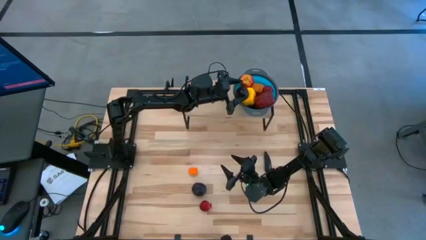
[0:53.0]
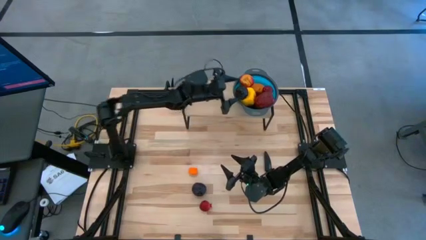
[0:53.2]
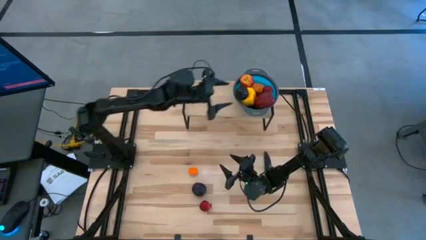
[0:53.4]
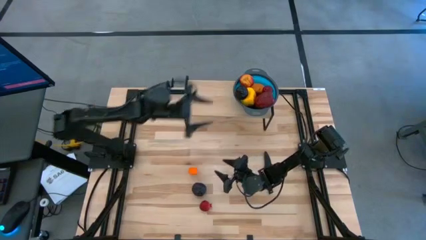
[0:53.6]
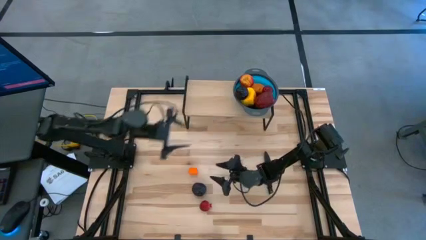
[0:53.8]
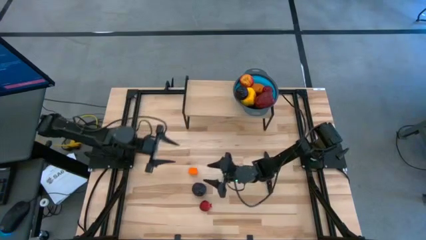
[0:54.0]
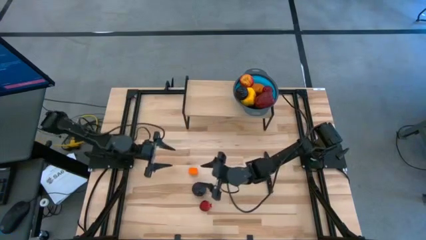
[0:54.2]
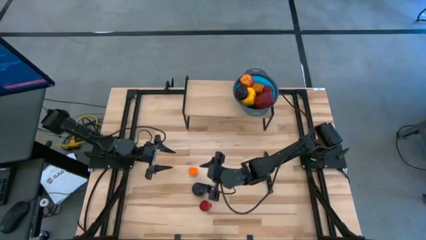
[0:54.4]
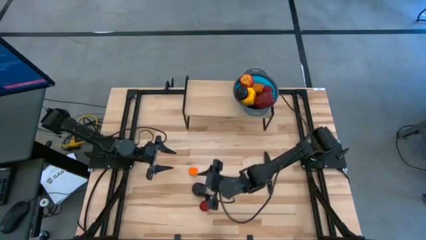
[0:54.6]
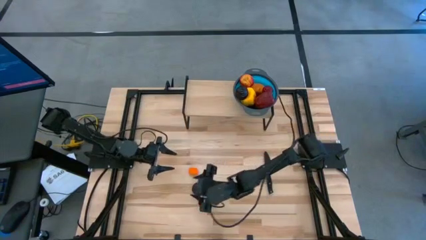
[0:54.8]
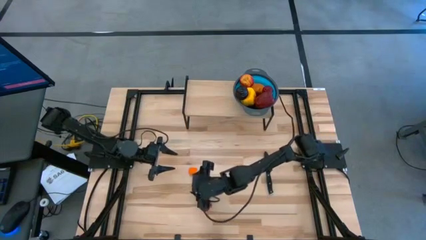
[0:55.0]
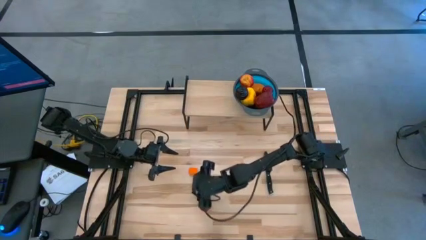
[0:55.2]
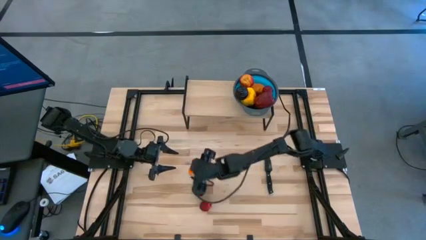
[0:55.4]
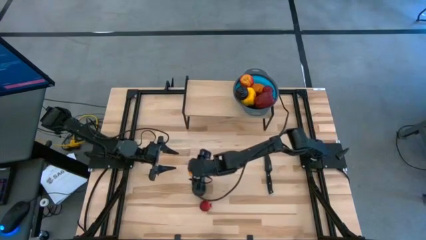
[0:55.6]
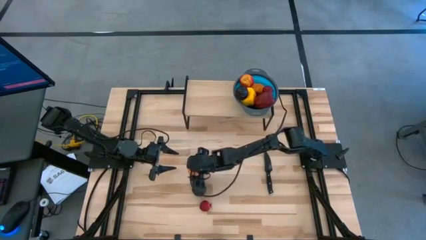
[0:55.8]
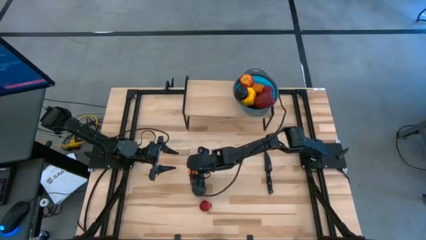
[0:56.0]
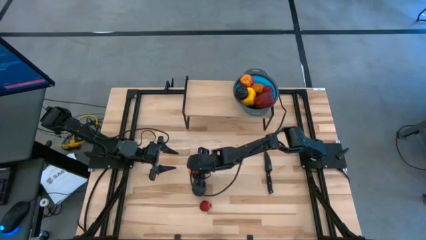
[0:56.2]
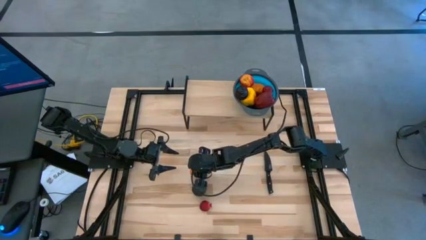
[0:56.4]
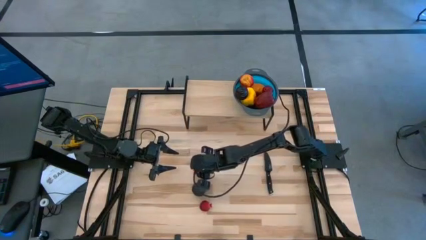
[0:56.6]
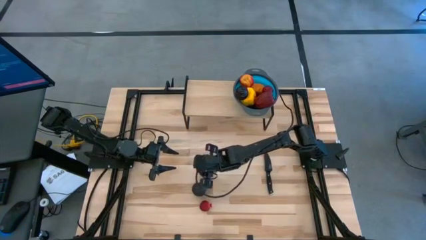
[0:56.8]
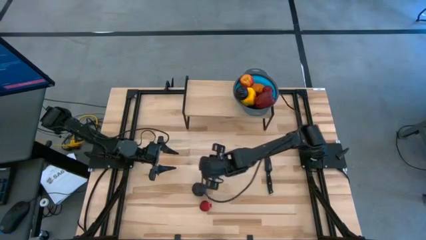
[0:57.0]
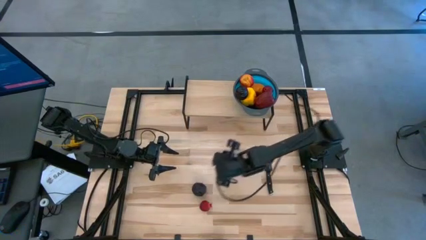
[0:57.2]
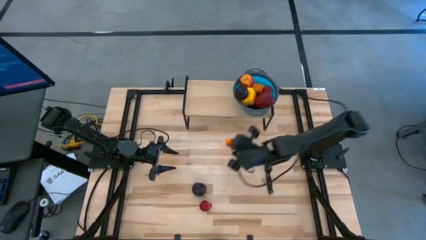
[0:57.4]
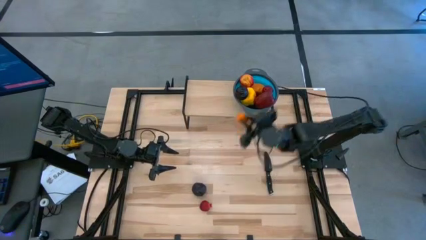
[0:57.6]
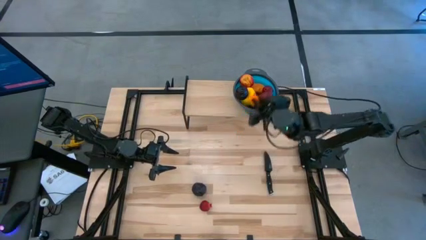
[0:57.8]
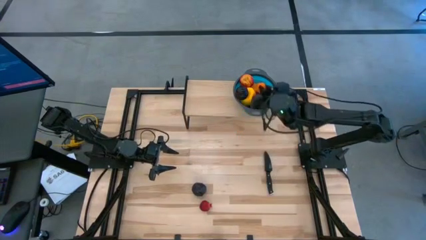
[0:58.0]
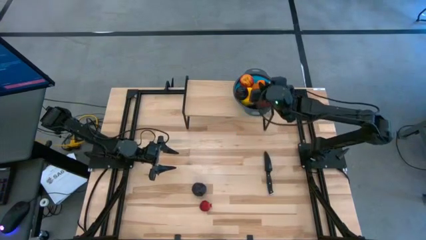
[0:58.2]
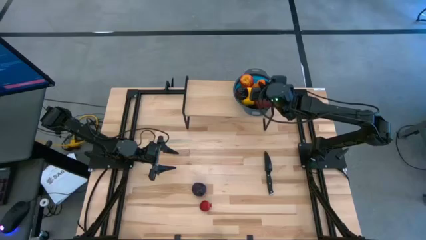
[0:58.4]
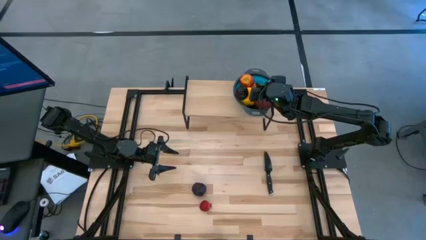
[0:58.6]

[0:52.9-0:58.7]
Task: Pick & Place Fruit
Put the orange into the strainer bowl

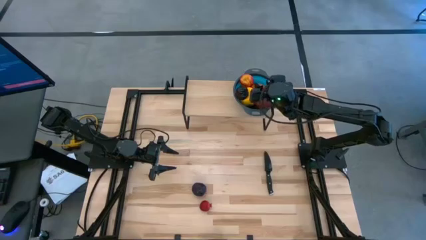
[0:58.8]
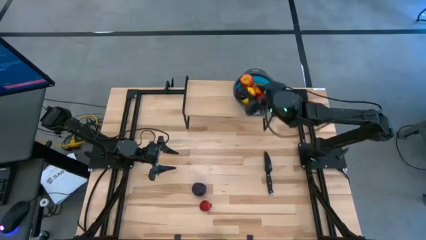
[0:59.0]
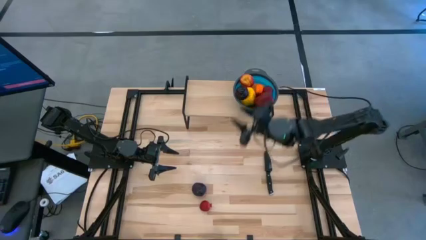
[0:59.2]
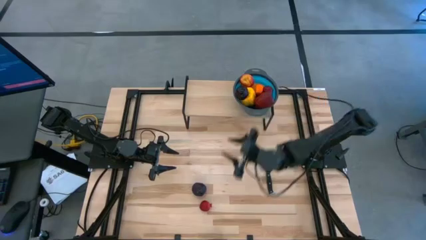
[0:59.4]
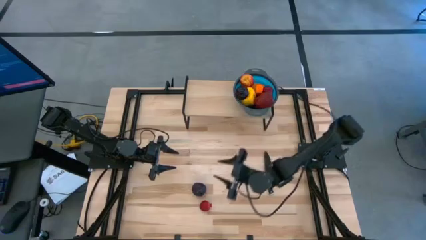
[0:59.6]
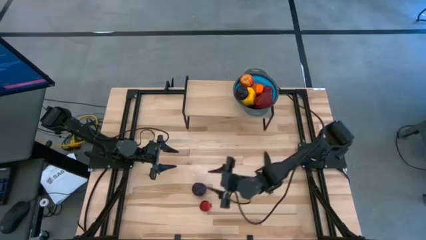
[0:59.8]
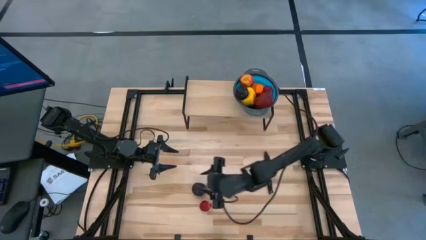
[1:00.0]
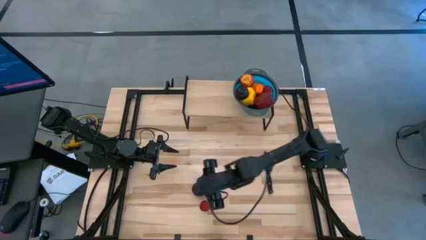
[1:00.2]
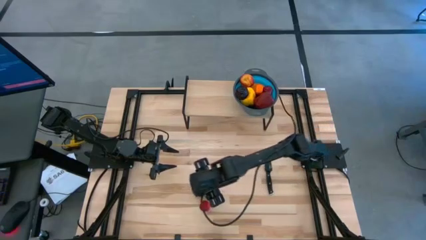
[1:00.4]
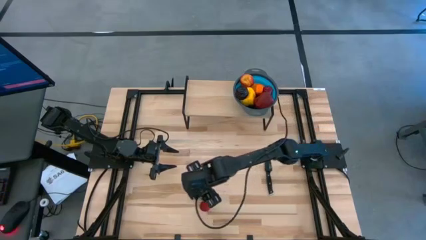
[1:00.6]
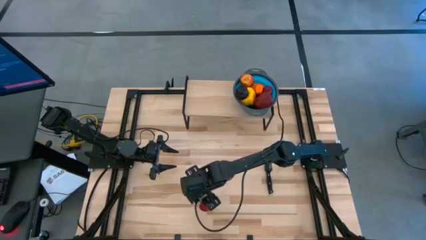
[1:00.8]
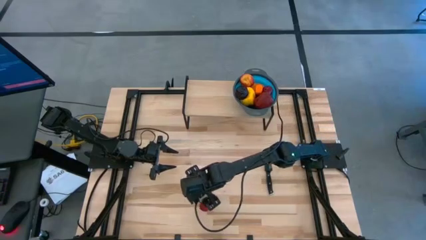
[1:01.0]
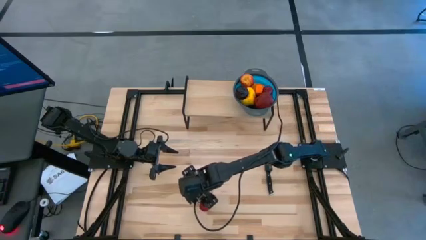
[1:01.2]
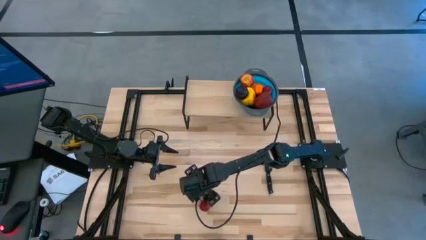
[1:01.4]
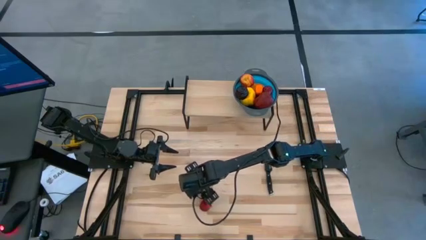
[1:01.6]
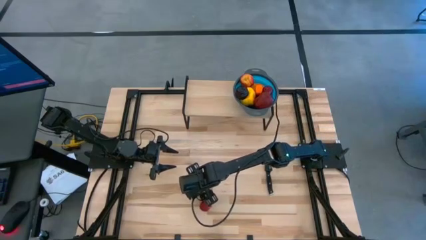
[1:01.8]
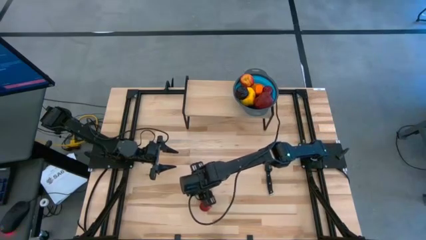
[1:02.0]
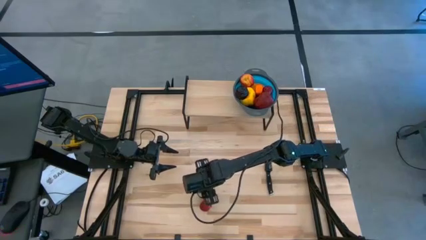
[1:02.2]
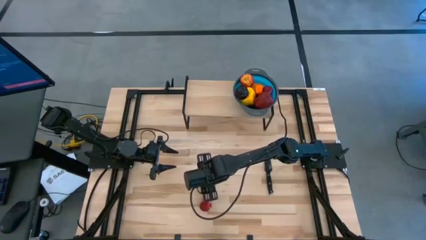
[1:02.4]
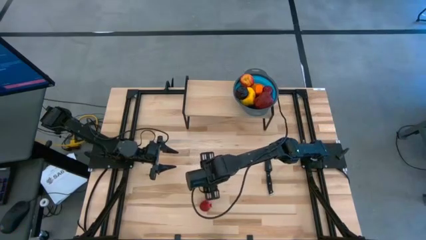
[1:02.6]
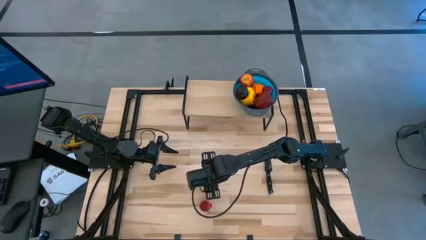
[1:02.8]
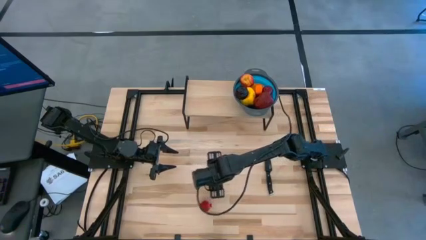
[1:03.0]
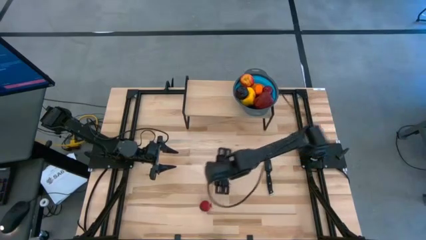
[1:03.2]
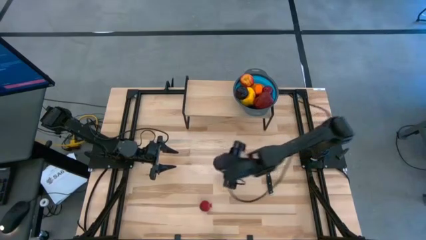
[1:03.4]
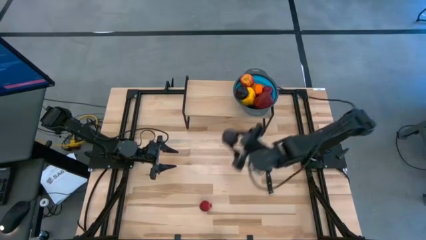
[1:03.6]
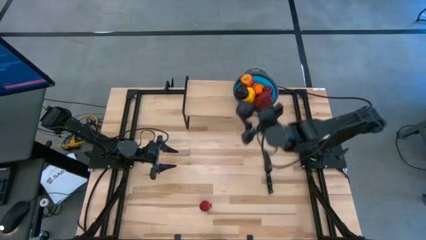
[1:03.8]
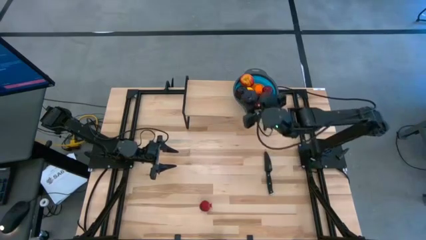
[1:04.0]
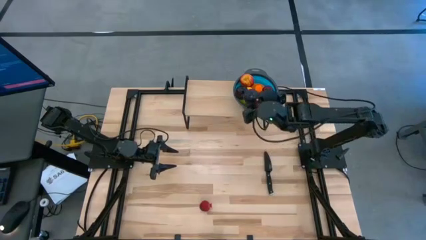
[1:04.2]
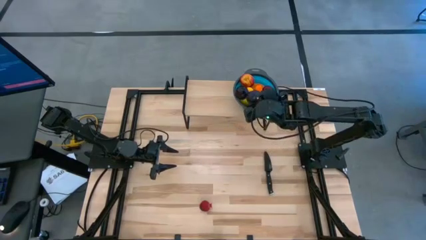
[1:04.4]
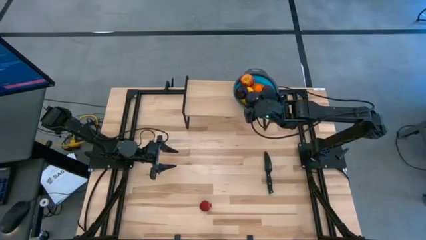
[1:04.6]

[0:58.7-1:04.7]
Put the plum into the strainer bowl

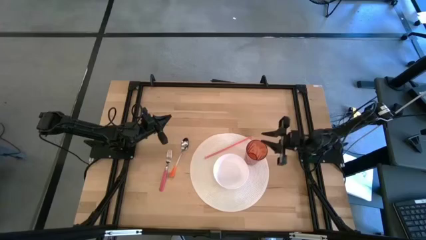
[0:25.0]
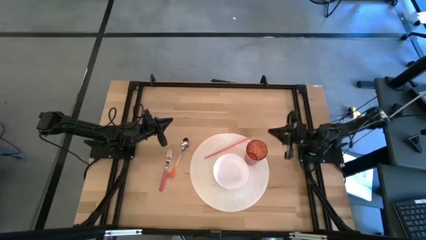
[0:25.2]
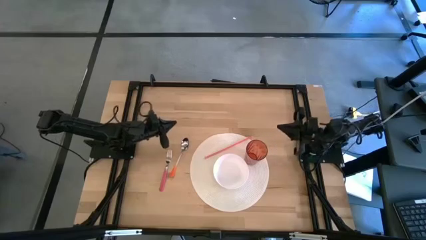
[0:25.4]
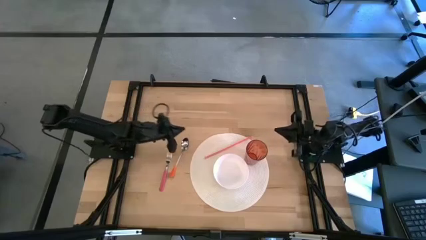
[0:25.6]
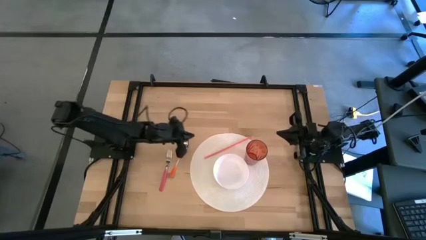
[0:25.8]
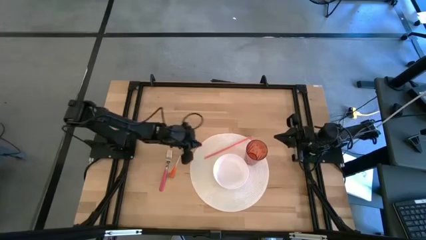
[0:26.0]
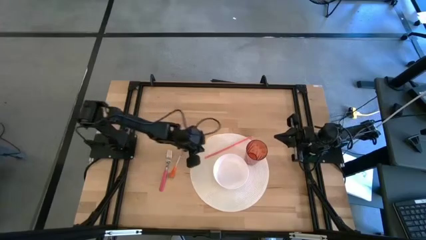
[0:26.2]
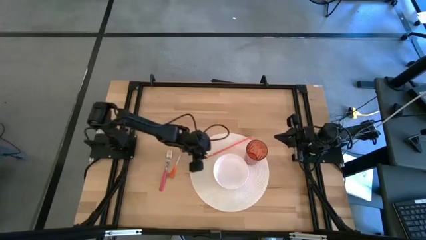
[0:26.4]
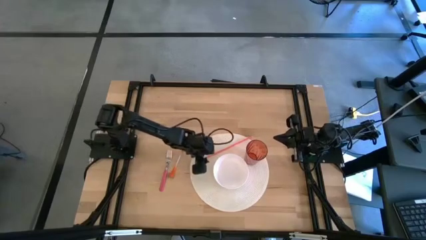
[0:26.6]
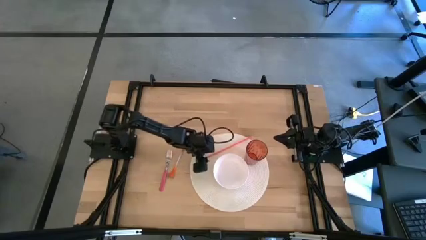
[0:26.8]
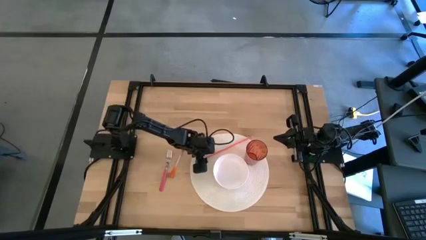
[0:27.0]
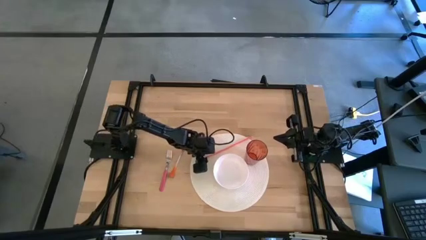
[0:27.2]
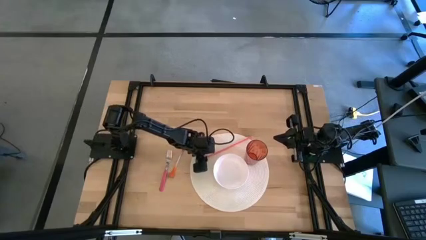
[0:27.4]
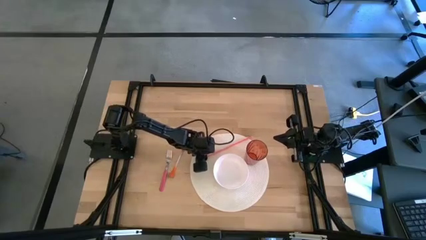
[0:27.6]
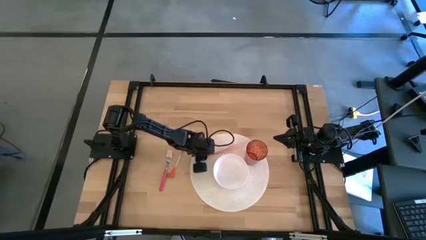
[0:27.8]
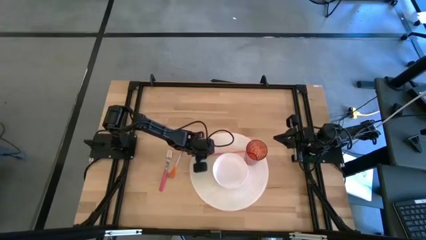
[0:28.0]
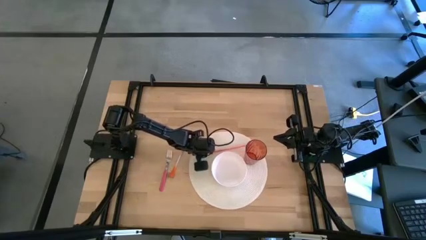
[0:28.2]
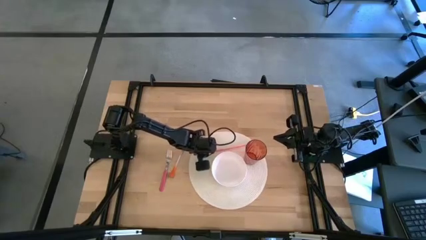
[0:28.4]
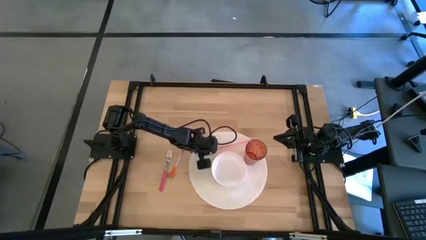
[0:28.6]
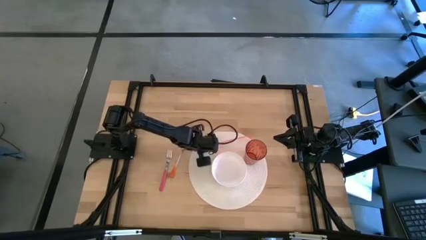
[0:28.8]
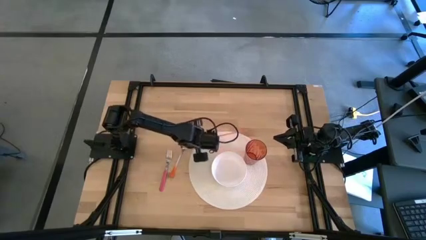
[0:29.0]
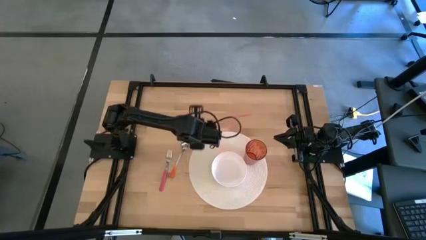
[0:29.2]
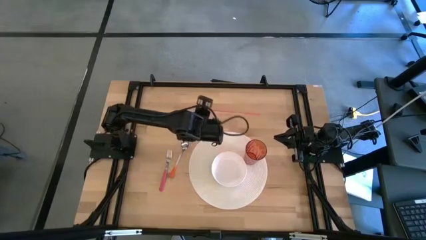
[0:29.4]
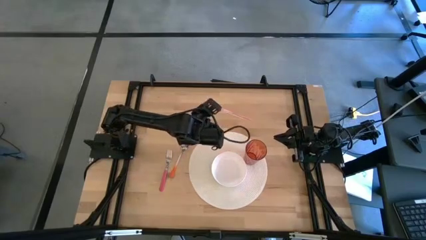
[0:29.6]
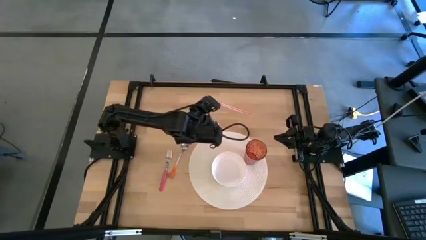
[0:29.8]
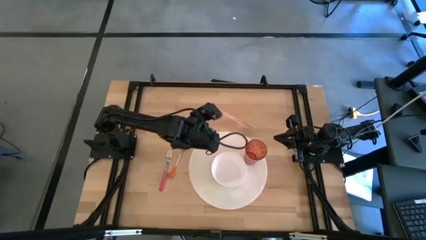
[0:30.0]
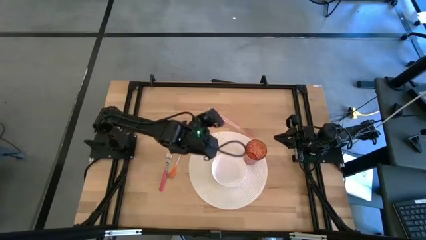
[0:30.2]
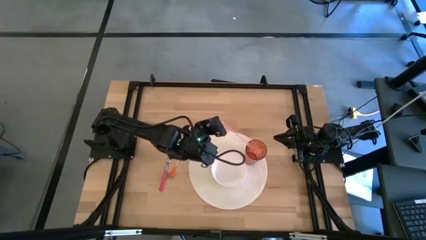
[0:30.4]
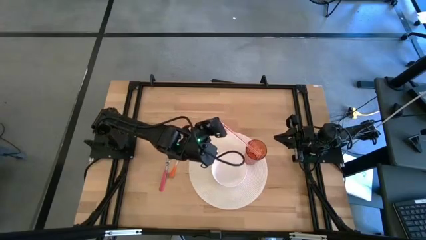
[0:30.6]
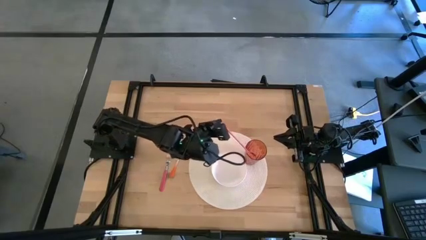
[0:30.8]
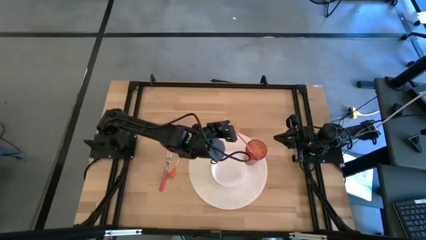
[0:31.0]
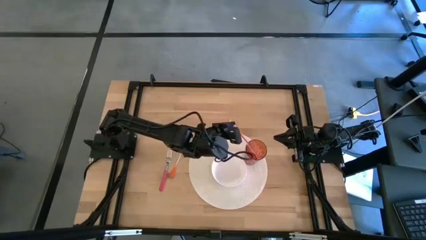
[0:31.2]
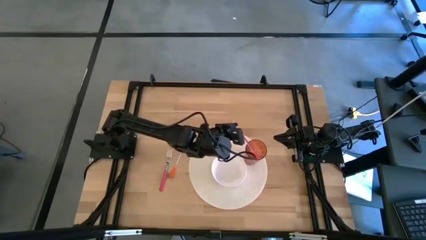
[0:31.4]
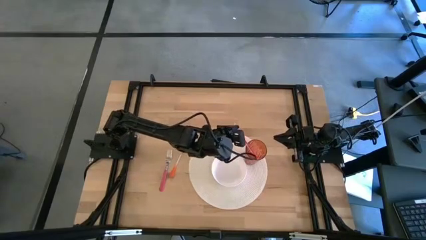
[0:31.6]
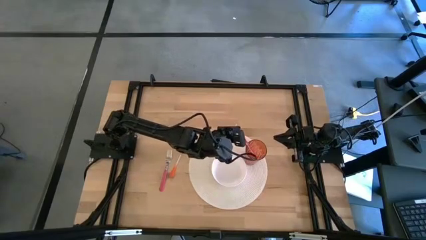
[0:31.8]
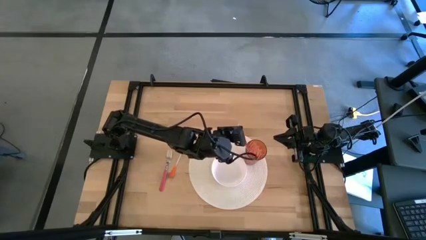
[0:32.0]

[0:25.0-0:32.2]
Task: Pick & Place Utensil
Put the red straw into the brown cup
